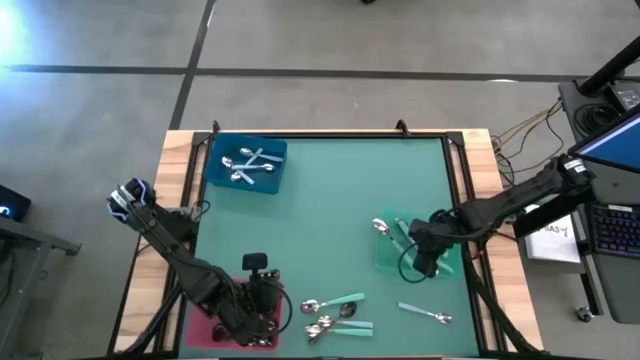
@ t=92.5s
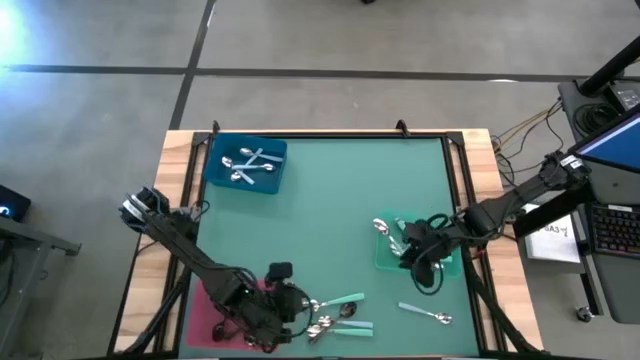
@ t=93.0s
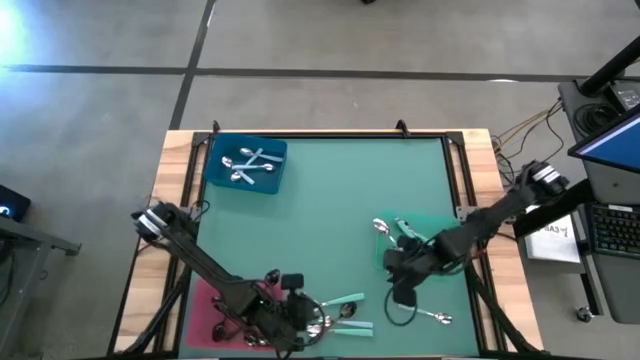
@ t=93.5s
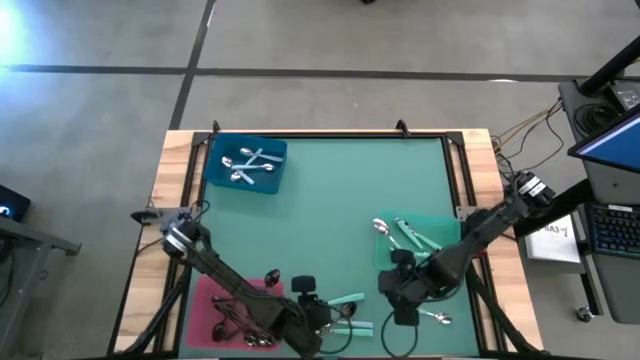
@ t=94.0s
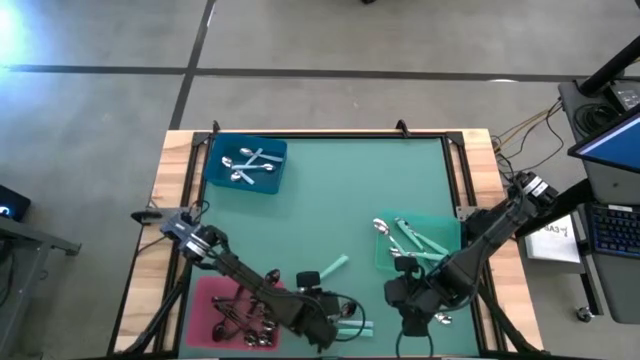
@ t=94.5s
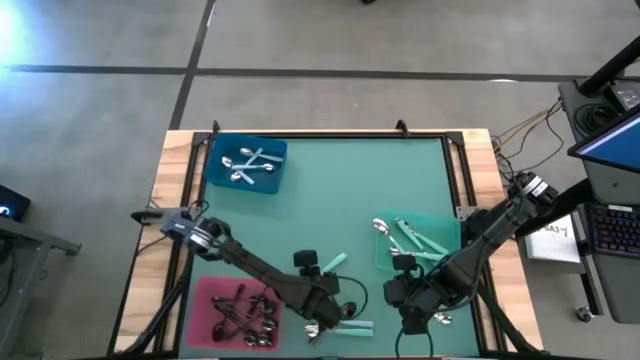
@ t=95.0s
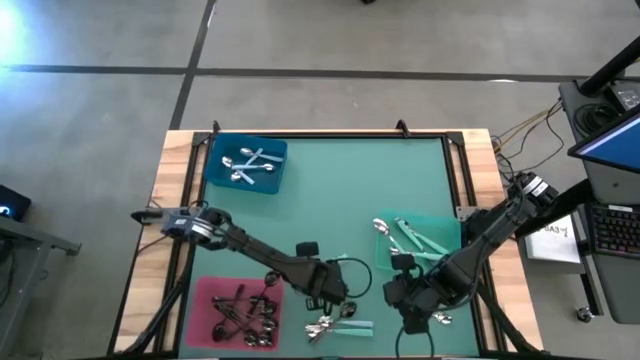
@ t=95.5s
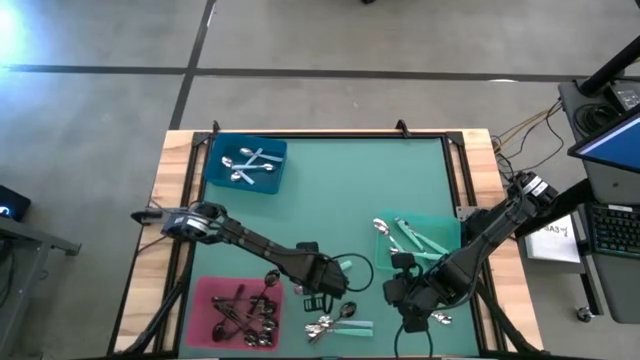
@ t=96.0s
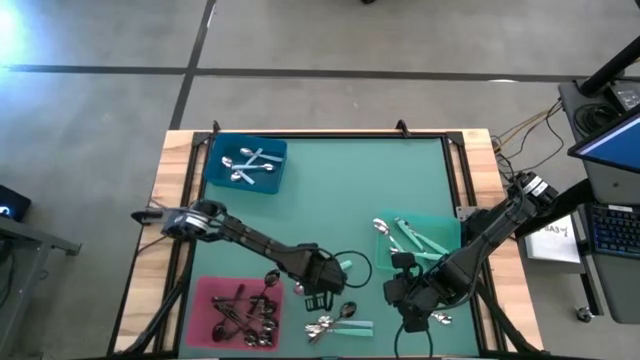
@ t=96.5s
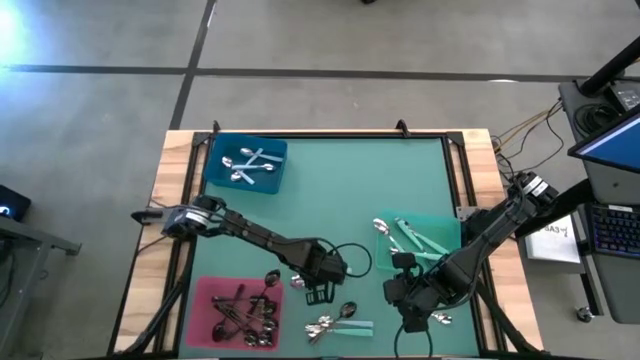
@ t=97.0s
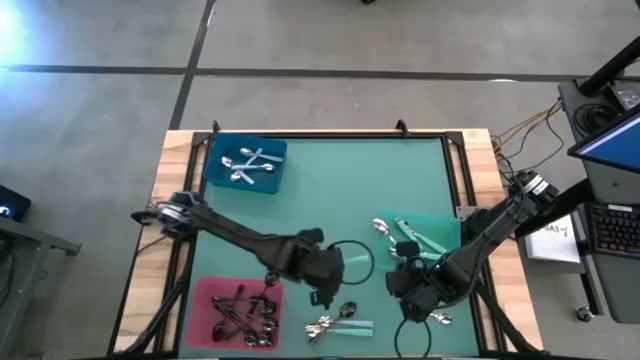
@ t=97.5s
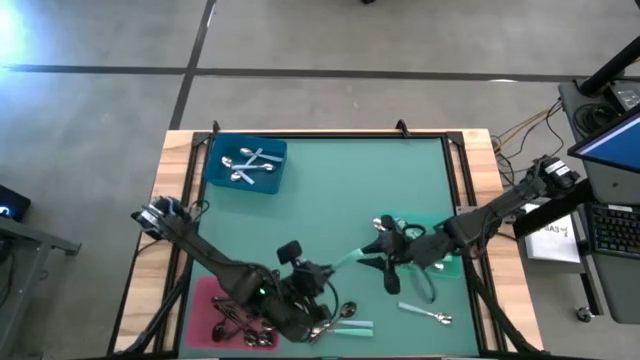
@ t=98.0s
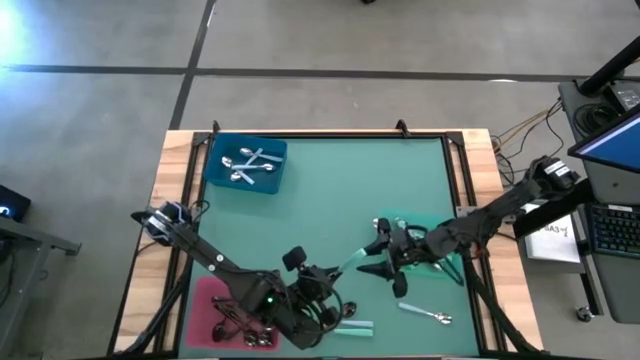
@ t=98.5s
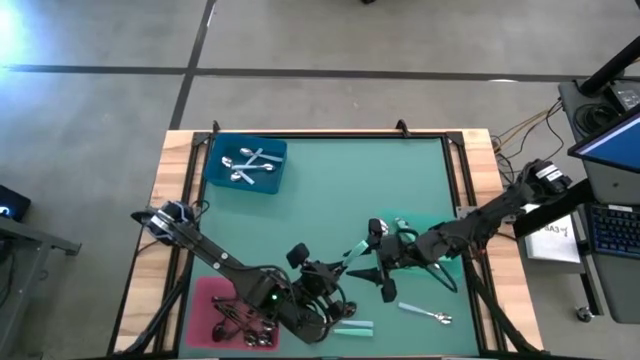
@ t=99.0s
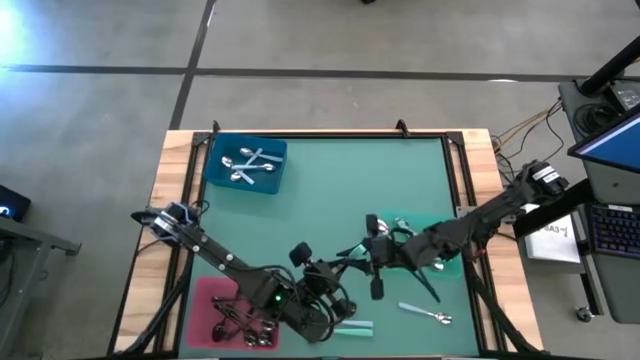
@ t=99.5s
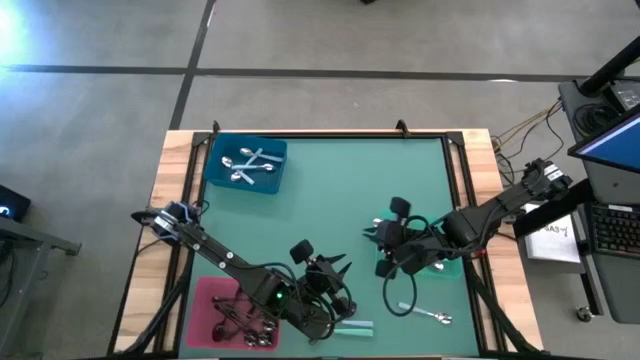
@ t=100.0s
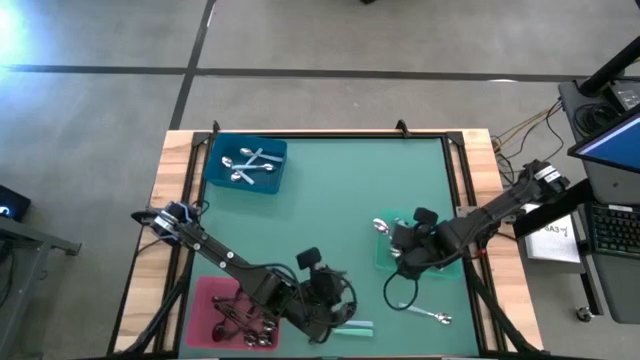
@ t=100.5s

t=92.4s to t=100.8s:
Task: Sort silverware by color (type)
Put the top green spoon into the green bin

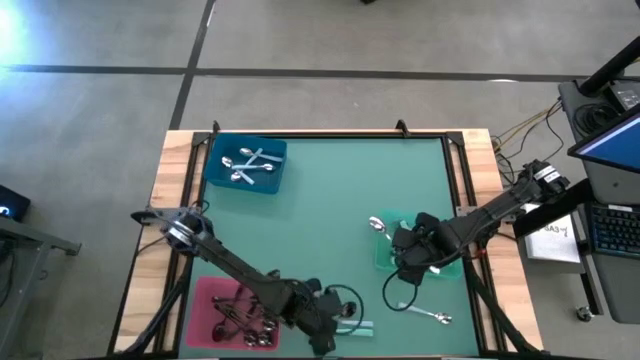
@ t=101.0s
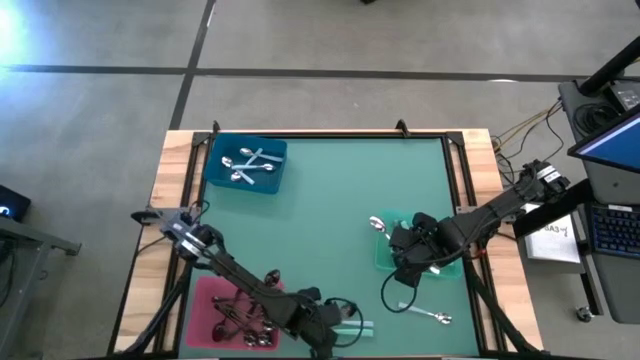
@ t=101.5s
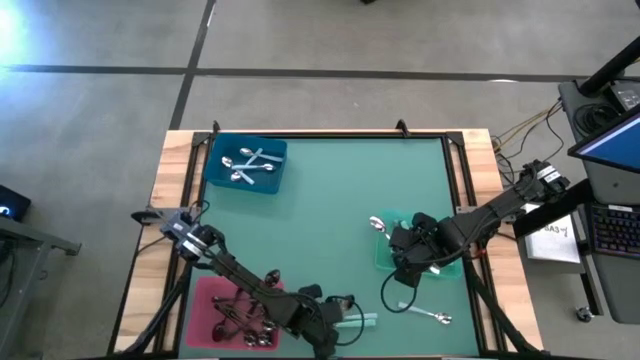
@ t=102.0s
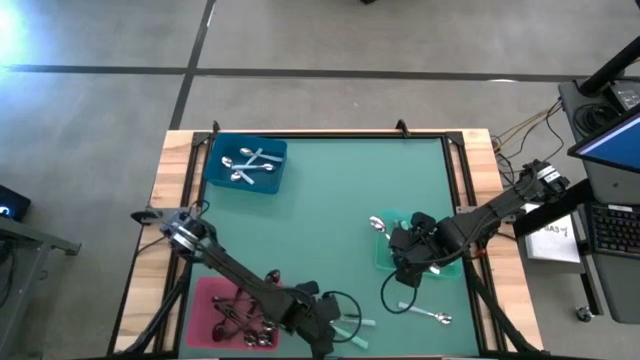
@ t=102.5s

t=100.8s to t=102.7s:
Put the black spoon into the pink bin

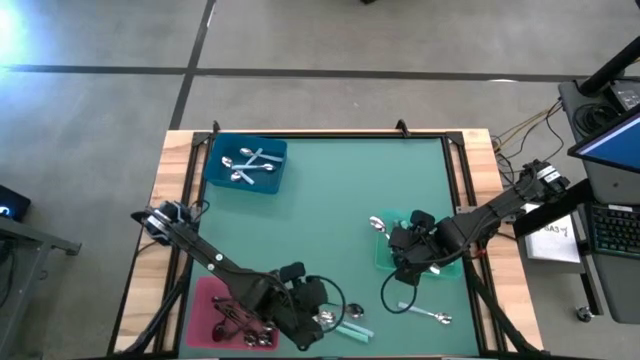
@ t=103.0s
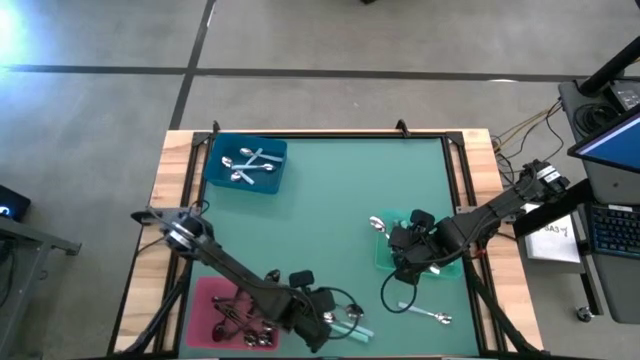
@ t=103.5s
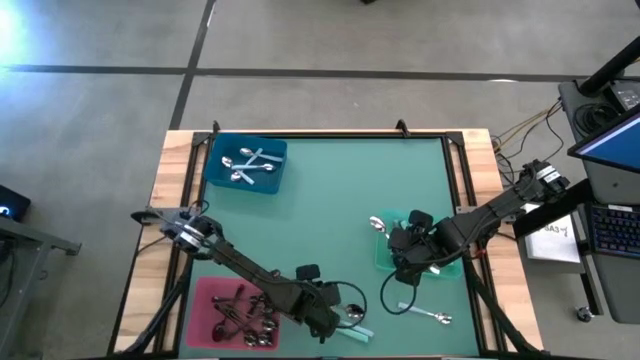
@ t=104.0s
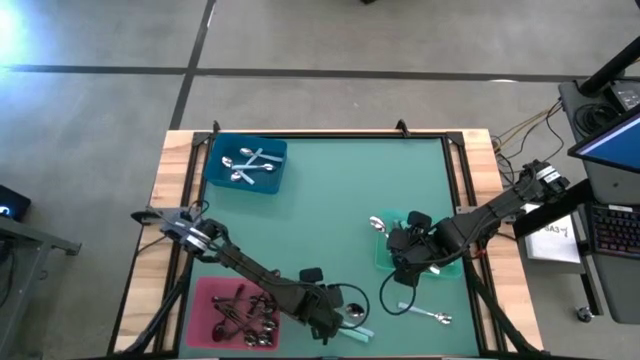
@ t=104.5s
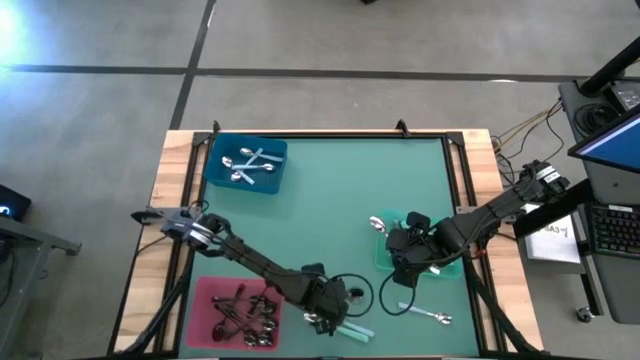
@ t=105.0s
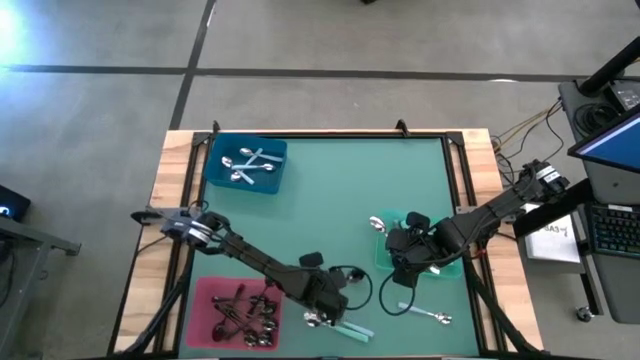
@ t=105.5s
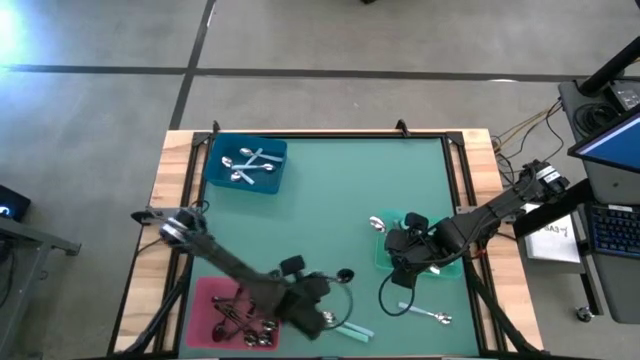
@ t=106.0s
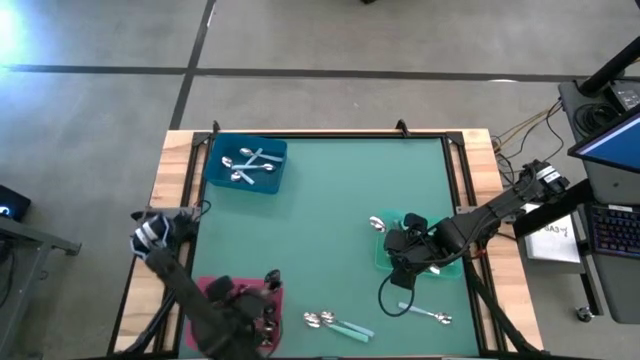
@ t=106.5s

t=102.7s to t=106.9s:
Put the black spoon into the pink bin

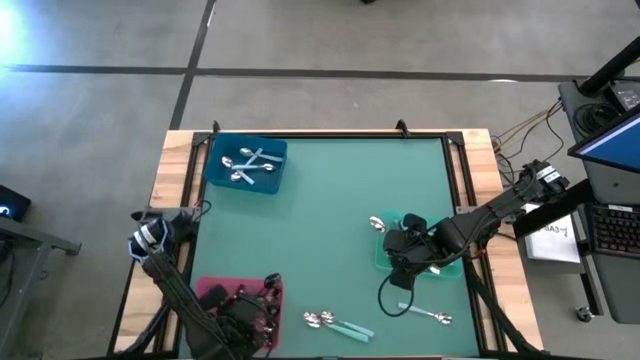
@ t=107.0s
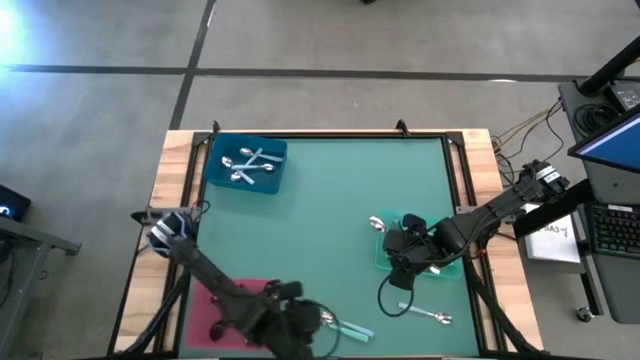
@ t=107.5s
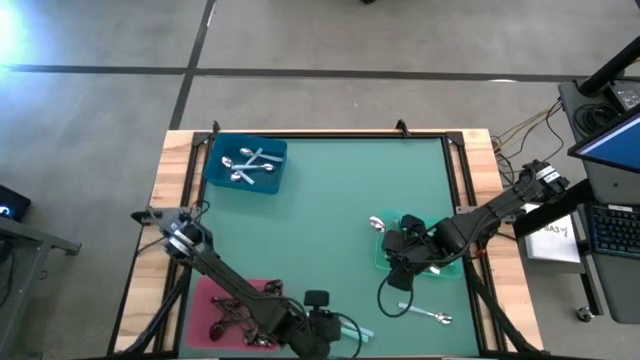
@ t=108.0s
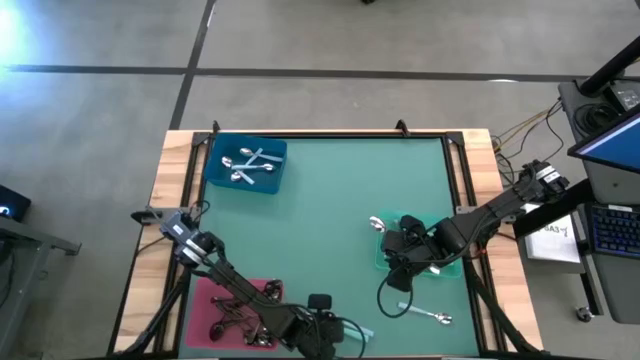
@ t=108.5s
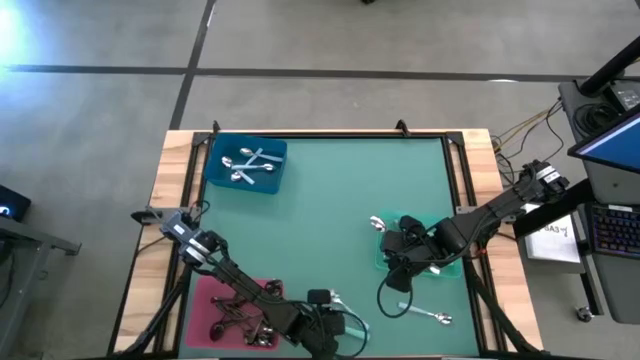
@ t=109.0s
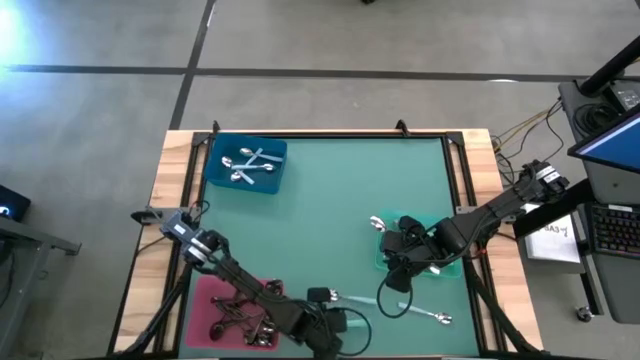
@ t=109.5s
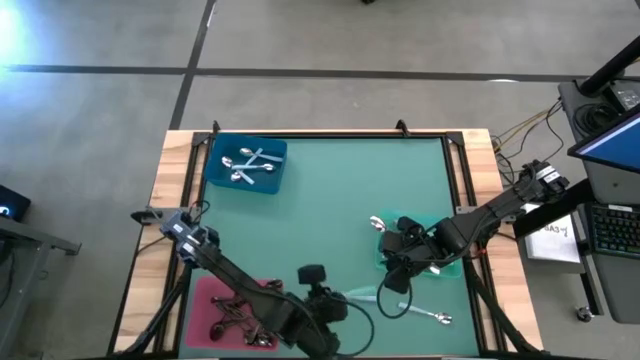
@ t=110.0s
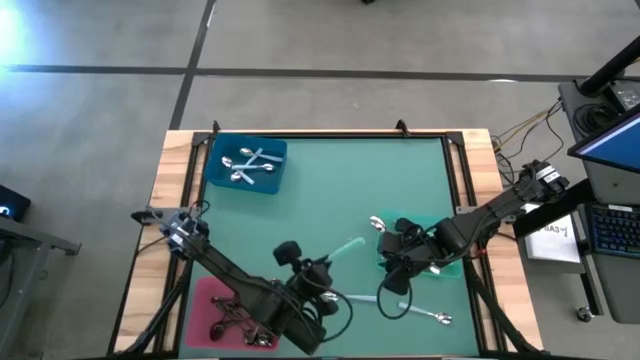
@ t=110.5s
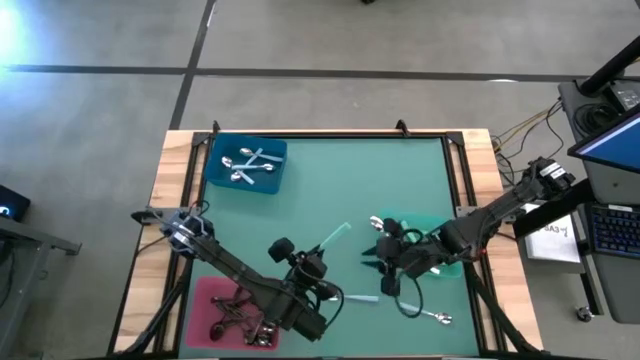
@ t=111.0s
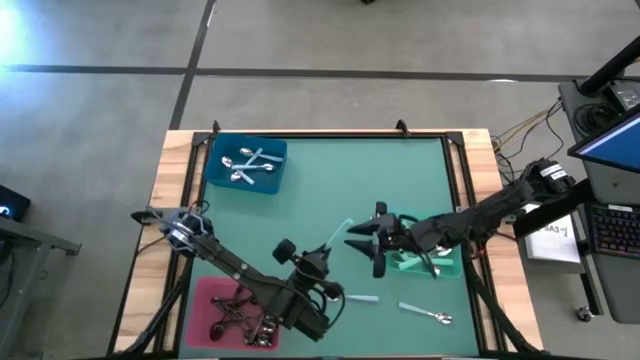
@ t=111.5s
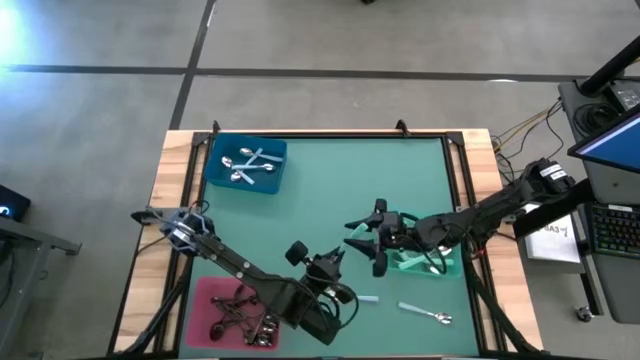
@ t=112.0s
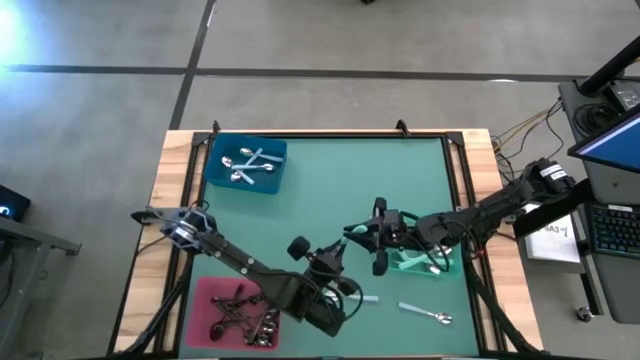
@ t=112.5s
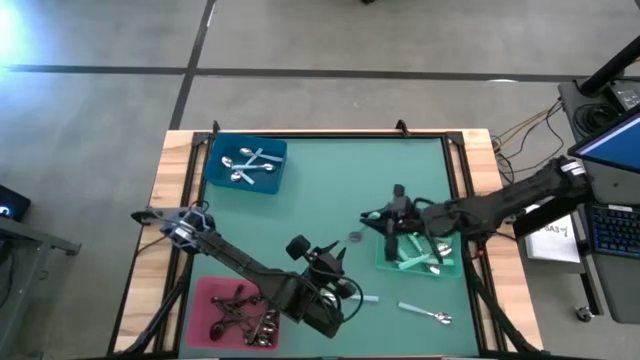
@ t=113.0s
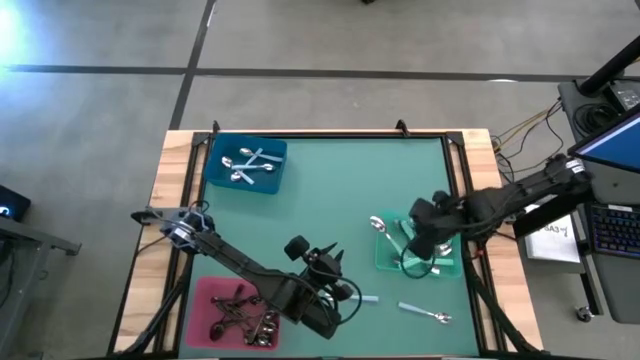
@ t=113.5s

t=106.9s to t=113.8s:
Put the green spoon into the green bin

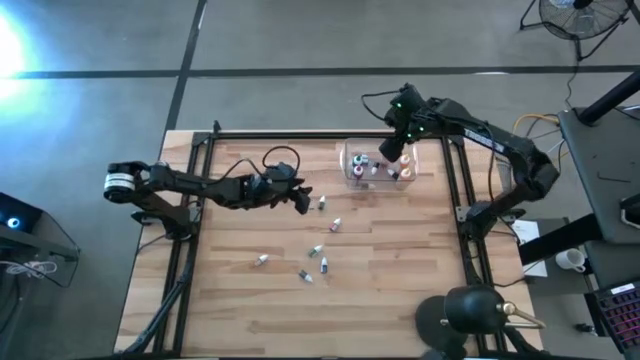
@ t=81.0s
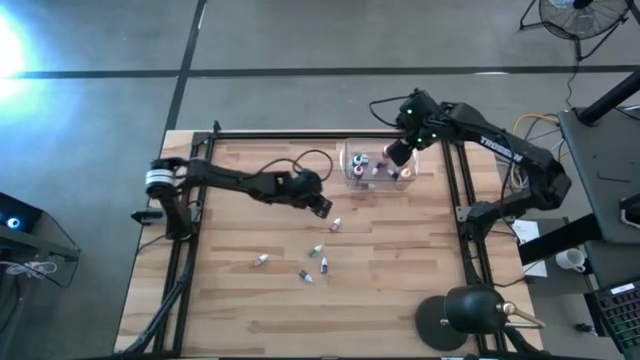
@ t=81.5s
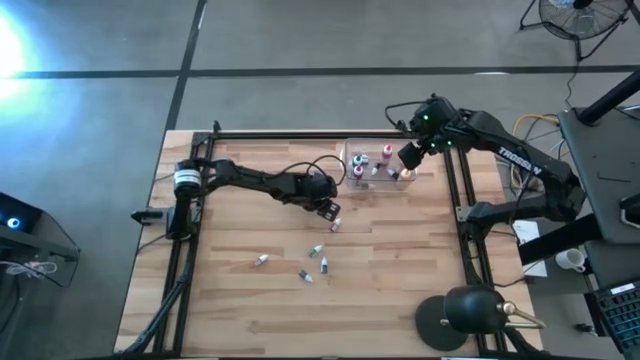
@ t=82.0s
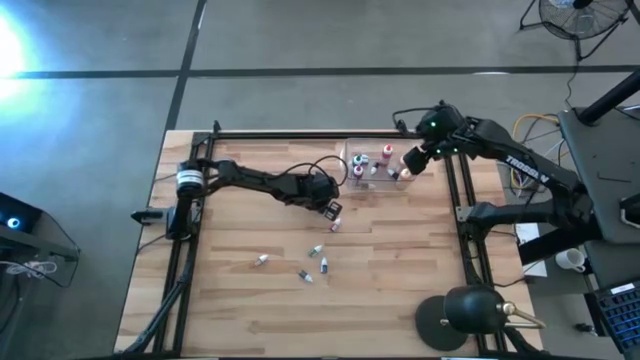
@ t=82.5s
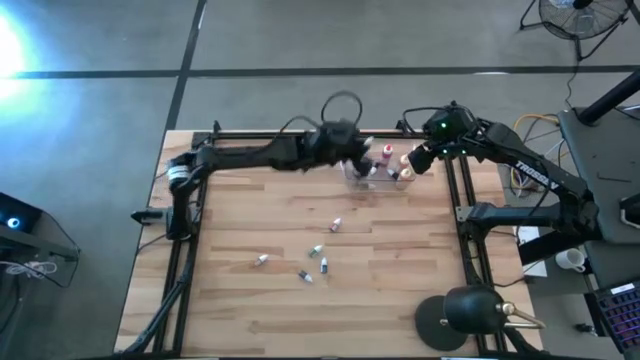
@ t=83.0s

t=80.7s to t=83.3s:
Task: Pick & Place food coloring
Put the small green food coloring bottle into the transparent bin
